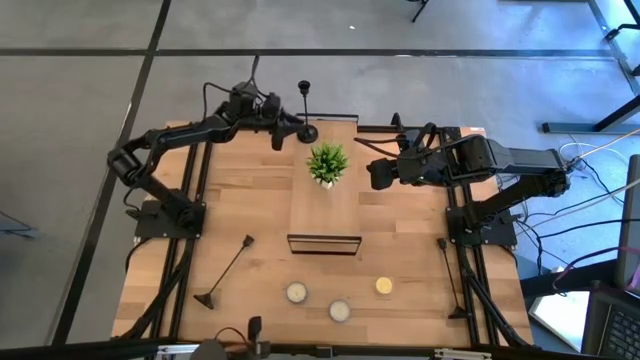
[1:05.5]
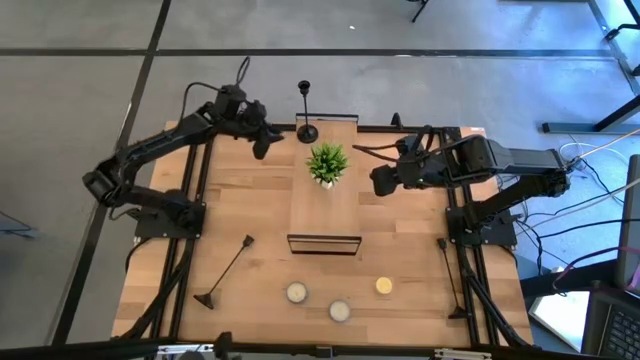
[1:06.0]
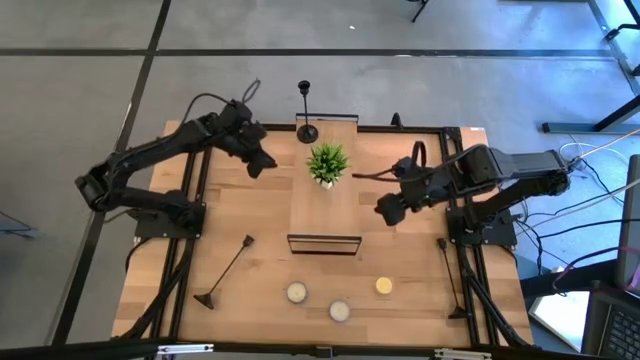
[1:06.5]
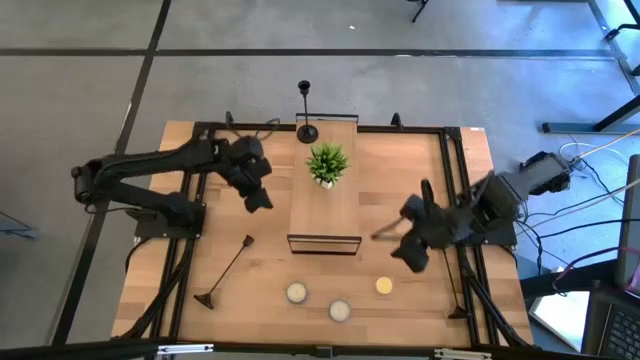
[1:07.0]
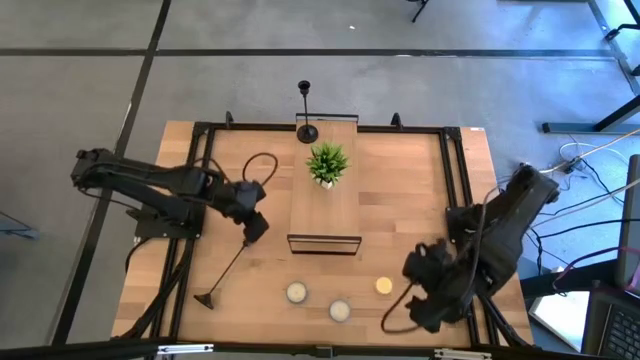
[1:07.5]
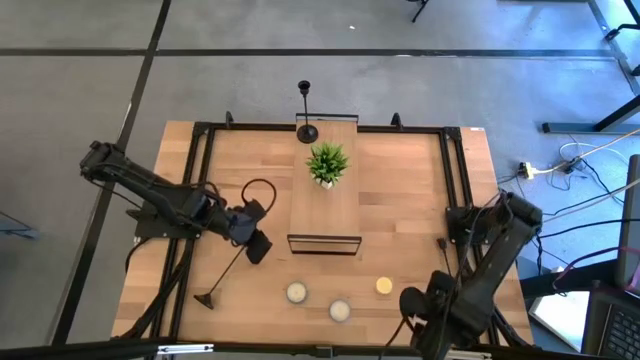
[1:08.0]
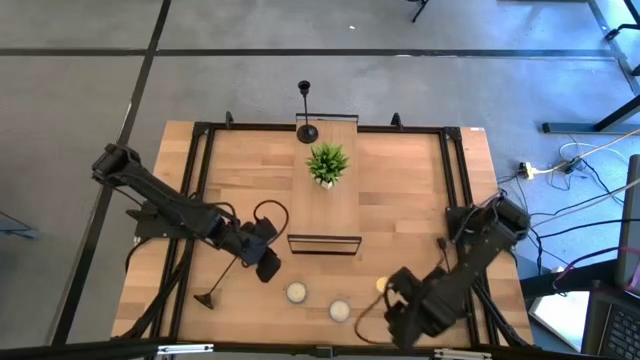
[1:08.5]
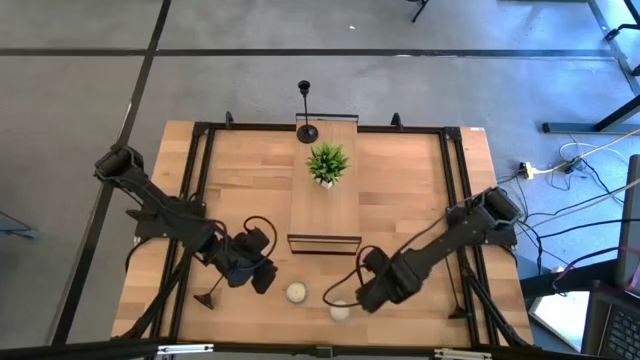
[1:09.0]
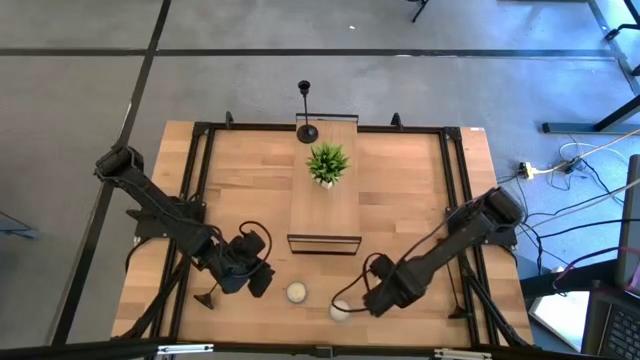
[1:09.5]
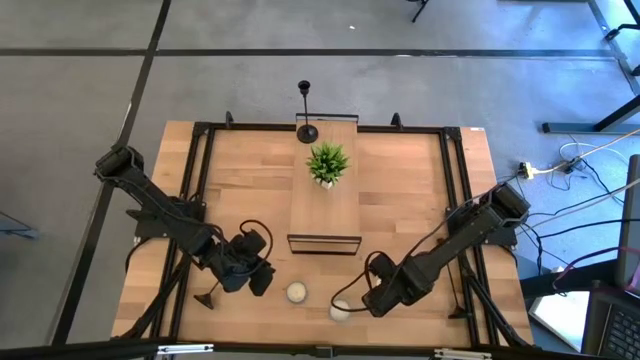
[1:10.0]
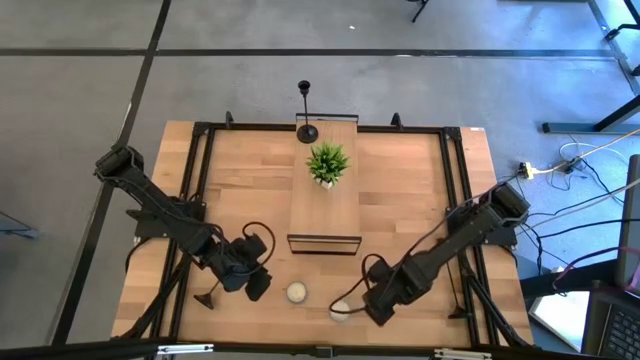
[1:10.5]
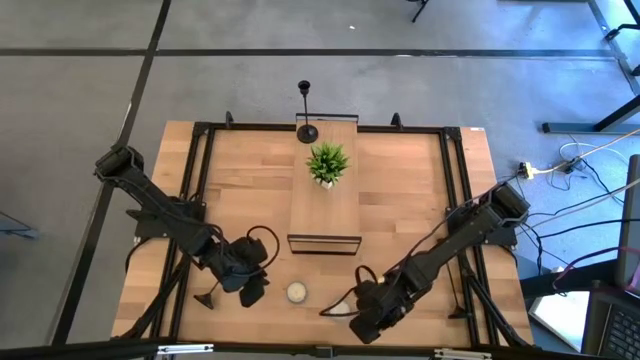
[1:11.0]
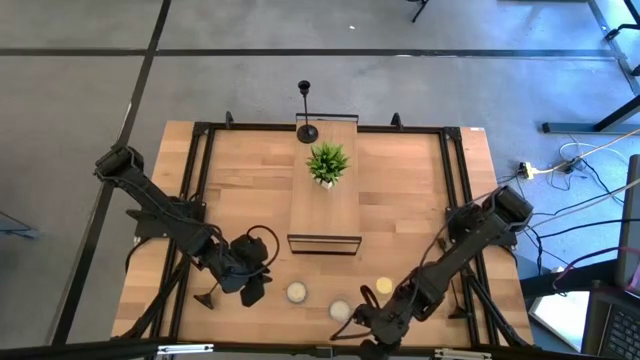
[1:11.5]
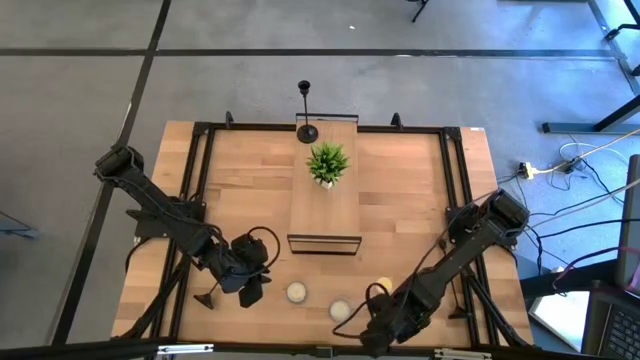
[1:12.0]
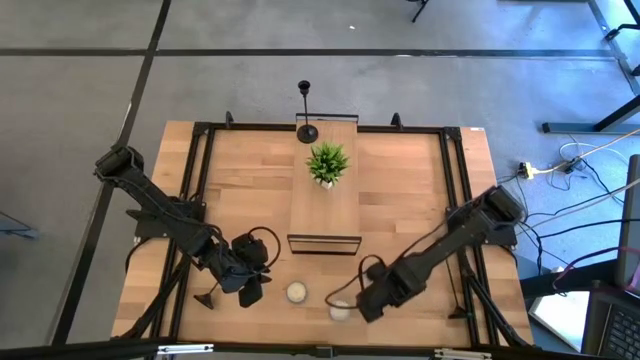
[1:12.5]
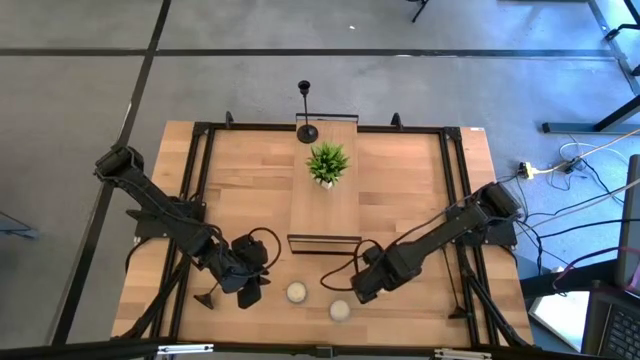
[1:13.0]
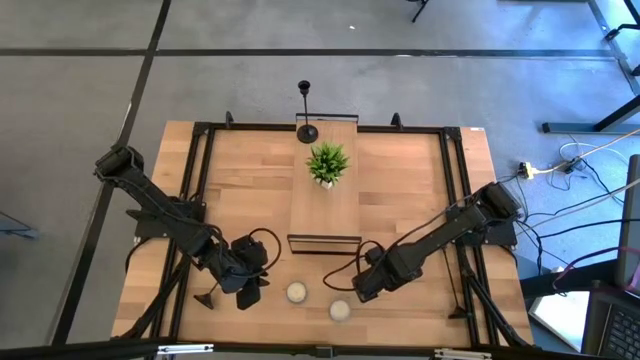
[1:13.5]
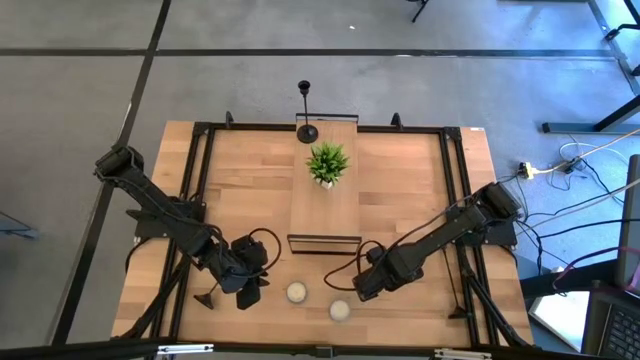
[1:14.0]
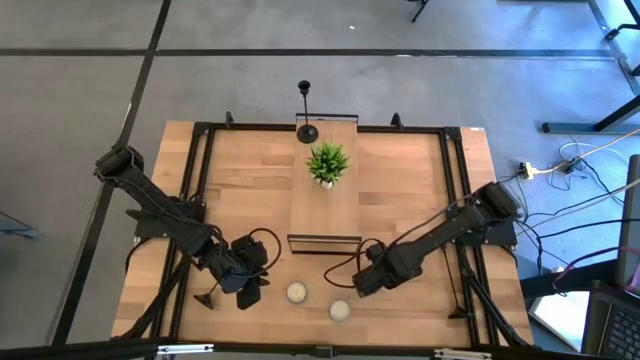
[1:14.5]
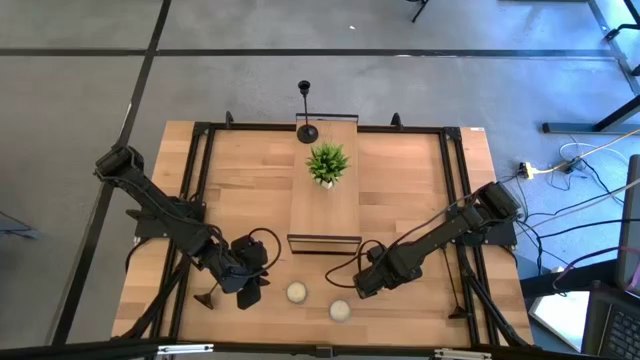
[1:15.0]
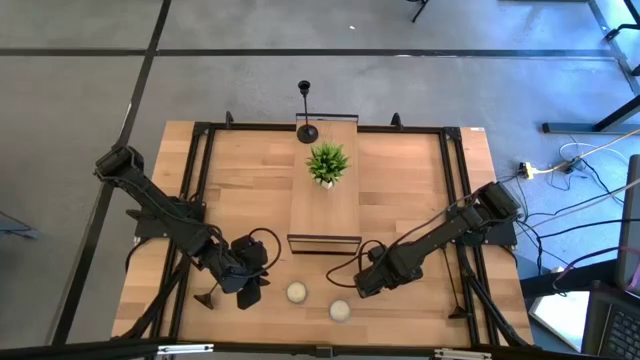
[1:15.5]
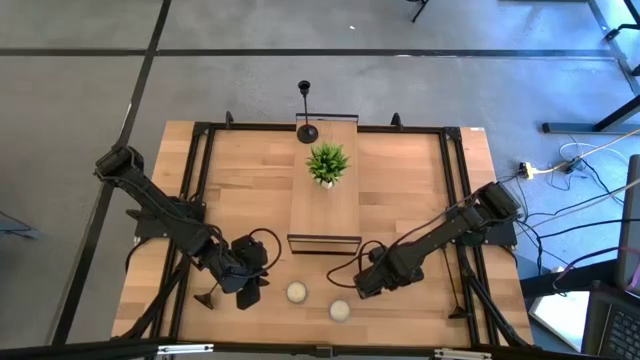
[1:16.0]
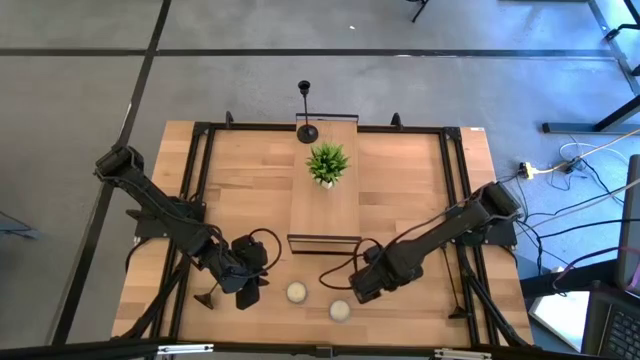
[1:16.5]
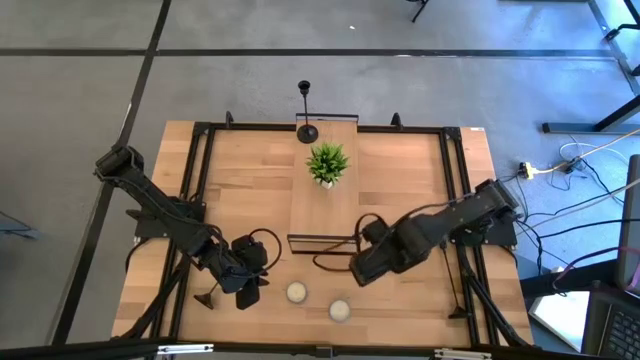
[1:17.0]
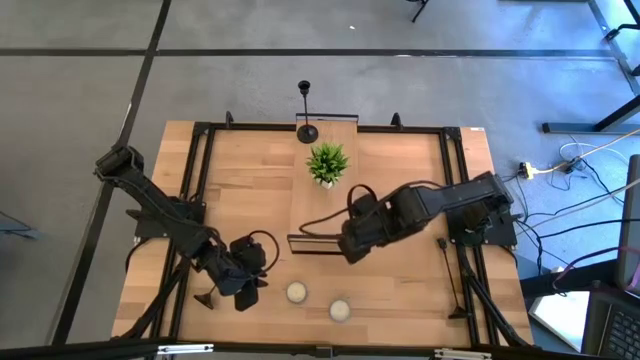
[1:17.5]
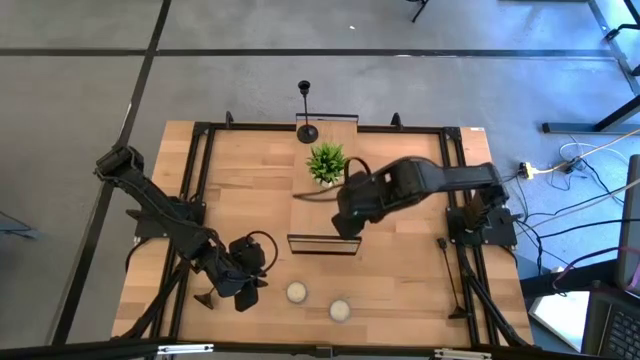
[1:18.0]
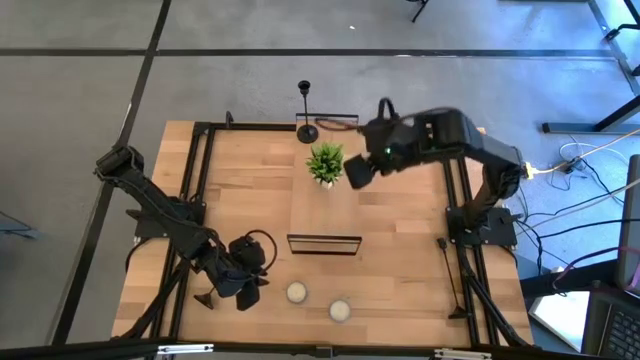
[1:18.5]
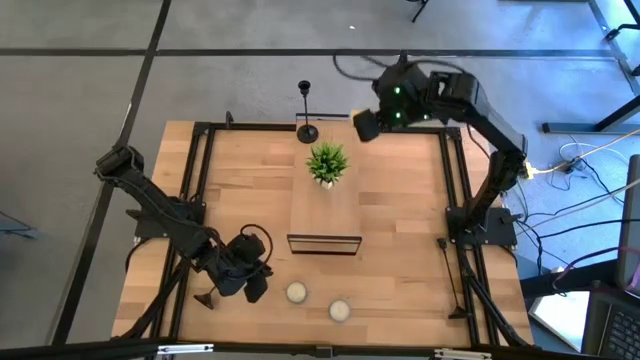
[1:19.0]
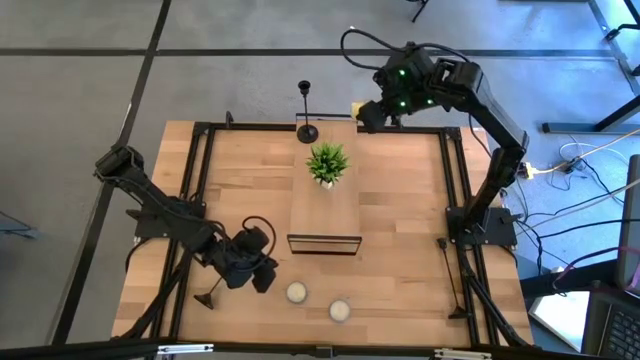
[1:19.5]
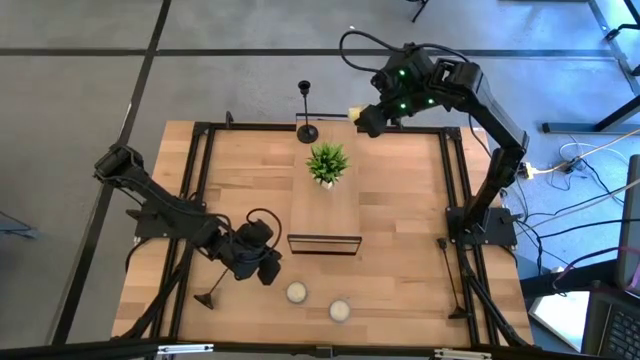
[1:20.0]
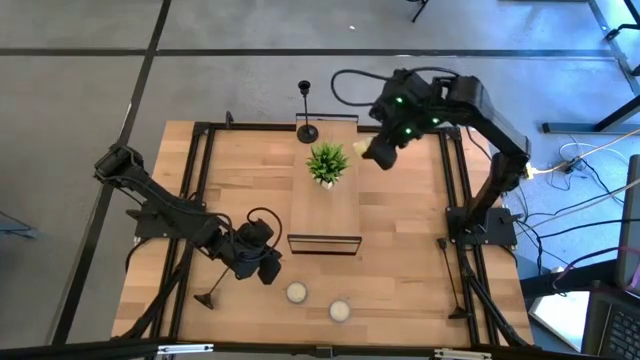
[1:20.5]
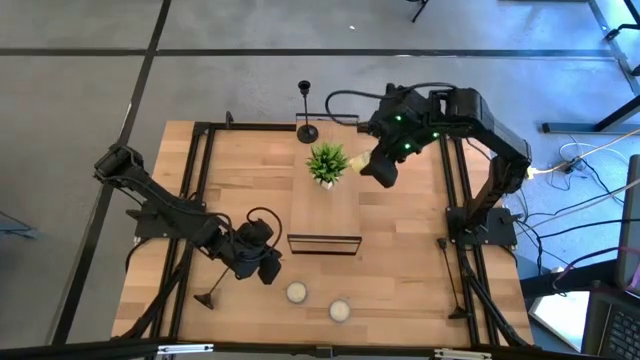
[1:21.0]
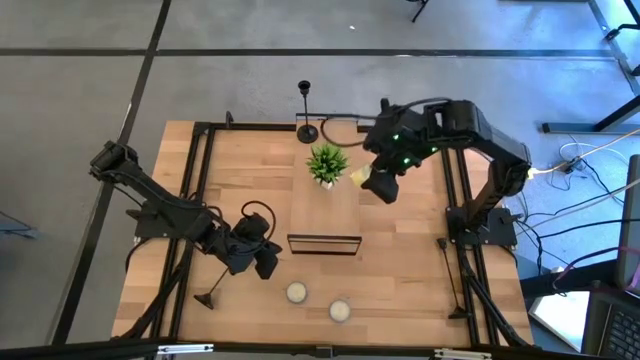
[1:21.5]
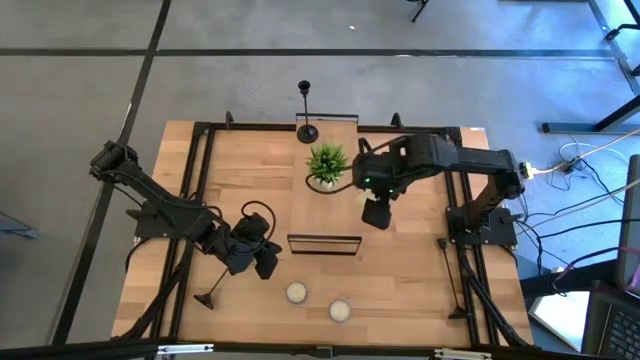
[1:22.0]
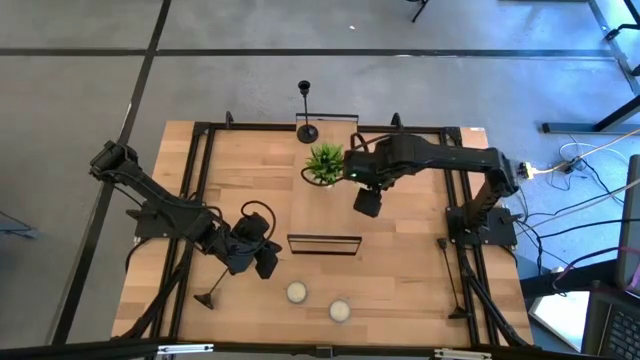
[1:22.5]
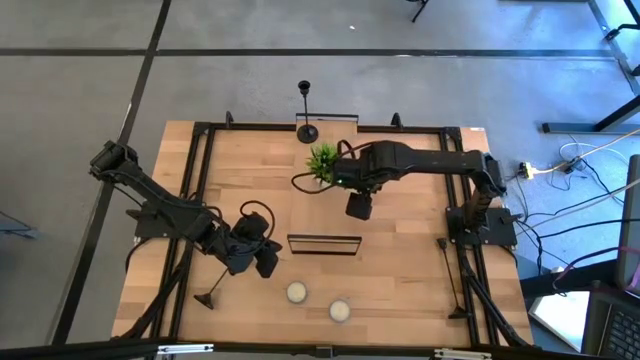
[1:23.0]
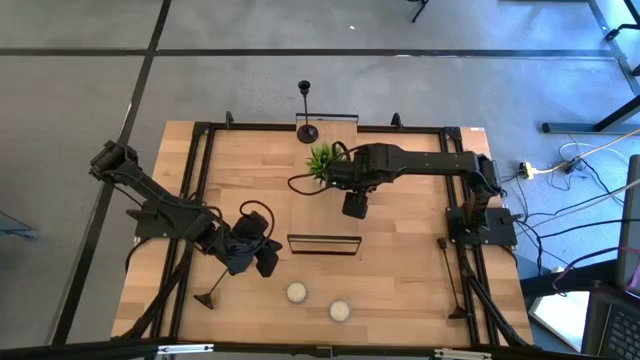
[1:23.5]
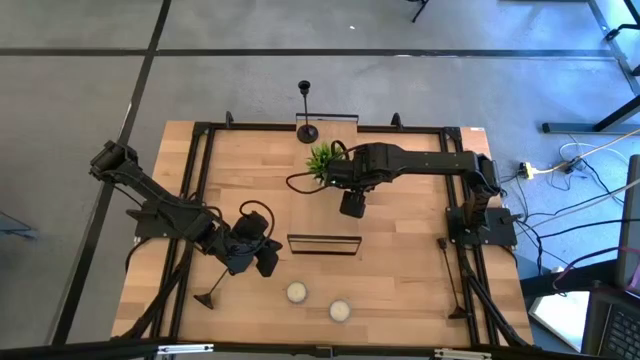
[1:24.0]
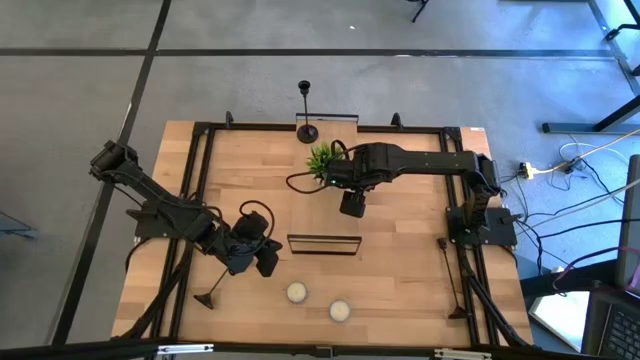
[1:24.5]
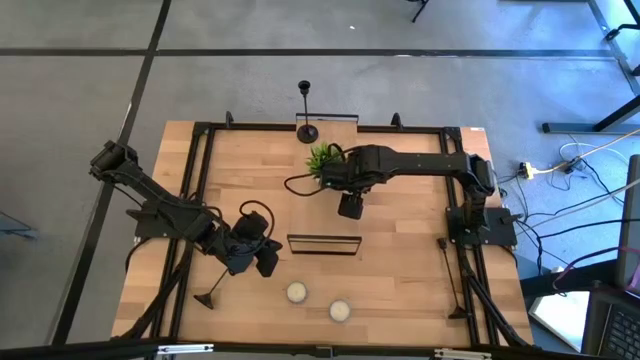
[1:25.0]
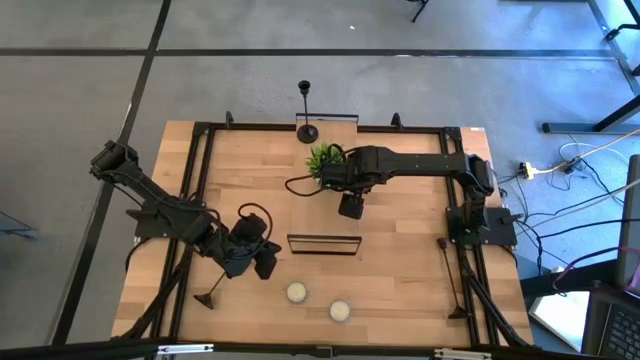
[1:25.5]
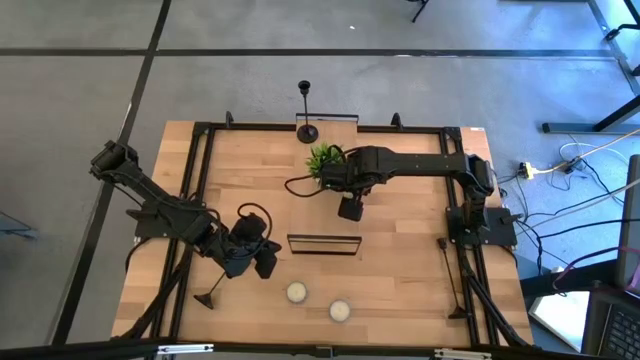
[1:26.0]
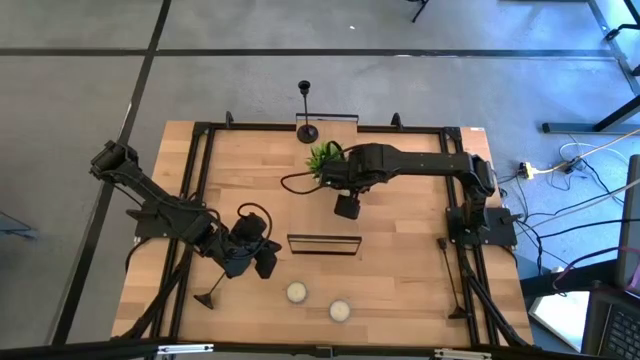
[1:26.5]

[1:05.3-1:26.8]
Task: Pick & Place candle stick holders
Put the transparent scented candle on the shelf
